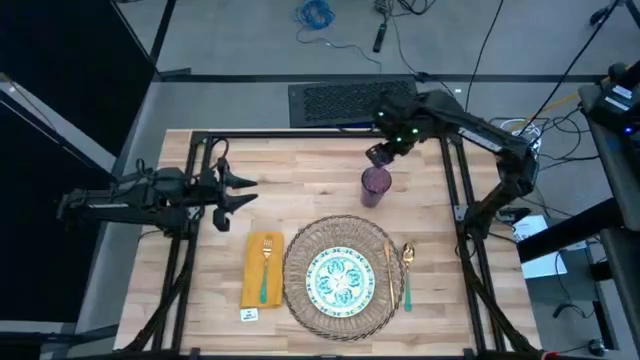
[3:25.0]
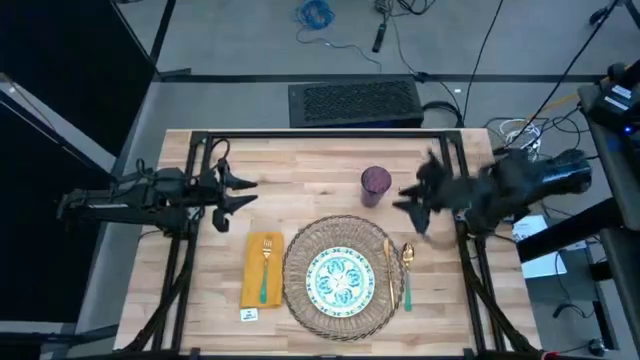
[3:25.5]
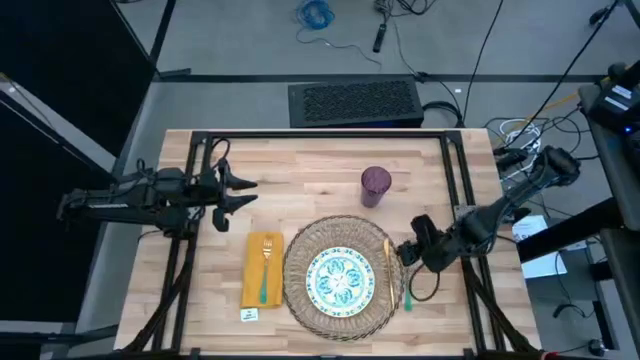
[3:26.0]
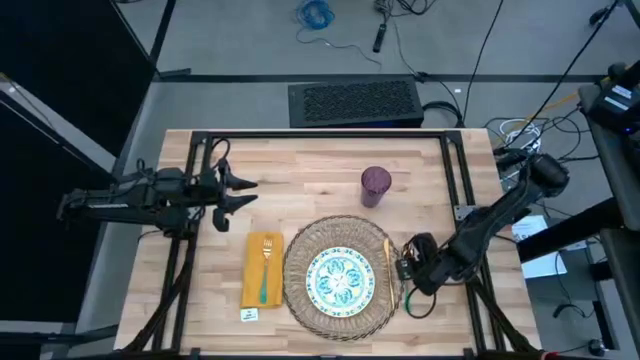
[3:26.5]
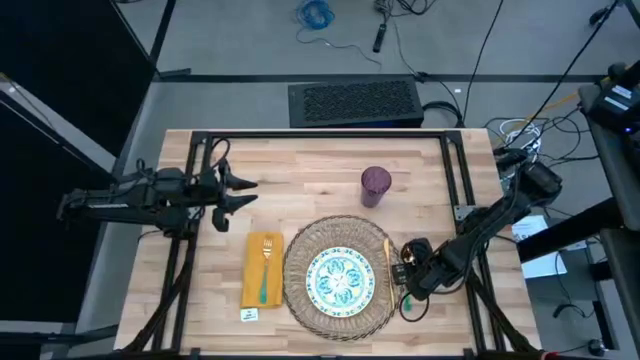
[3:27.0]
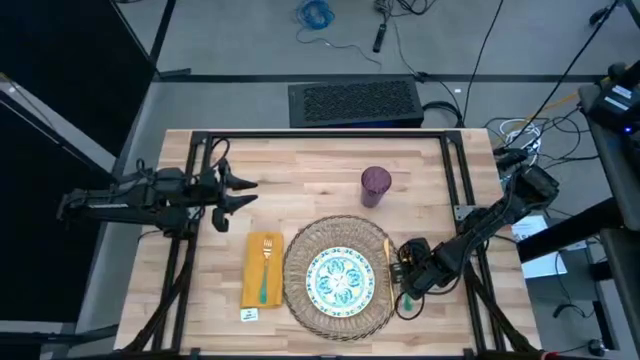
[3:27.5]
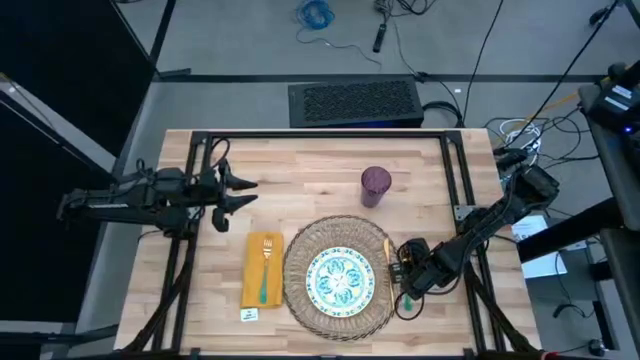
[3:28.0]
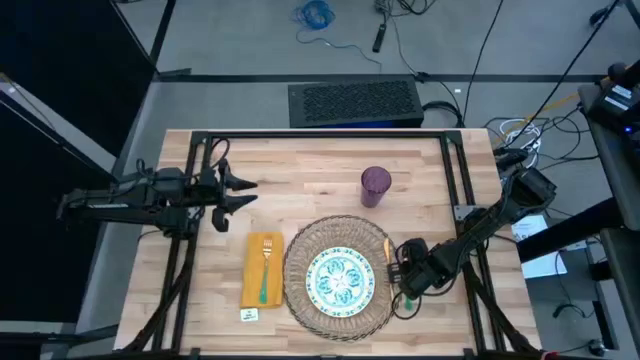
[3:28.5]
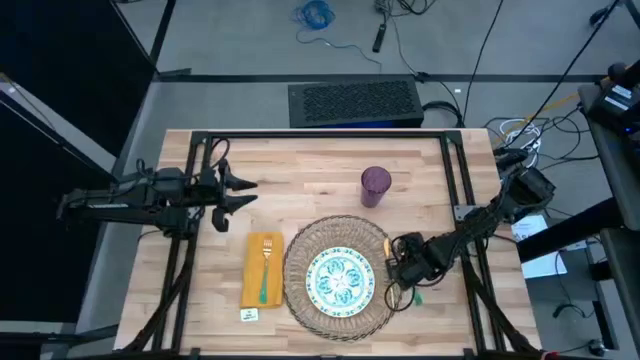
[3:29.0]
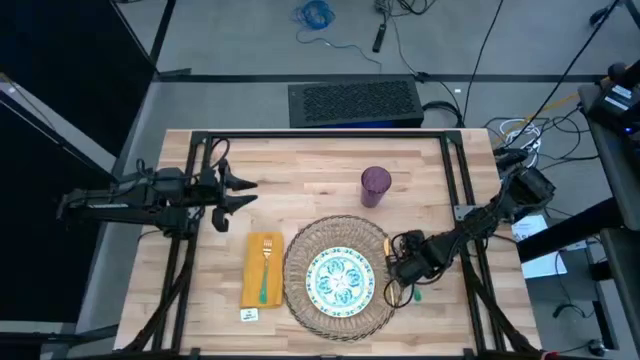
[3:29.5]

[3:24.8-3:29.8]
Task: Set table place
Adjust the green table spoon

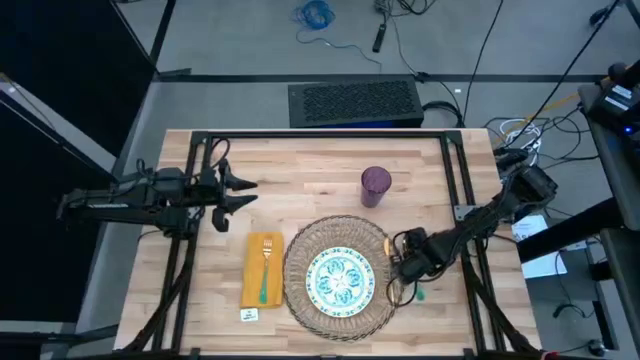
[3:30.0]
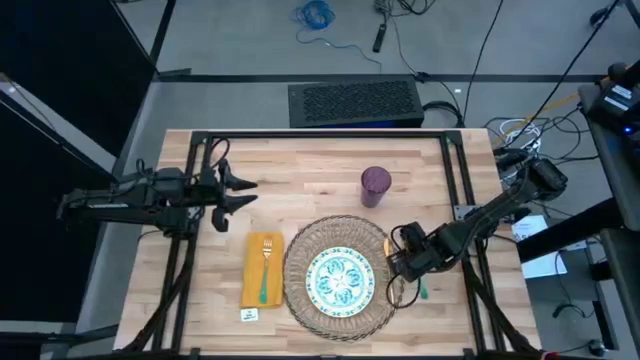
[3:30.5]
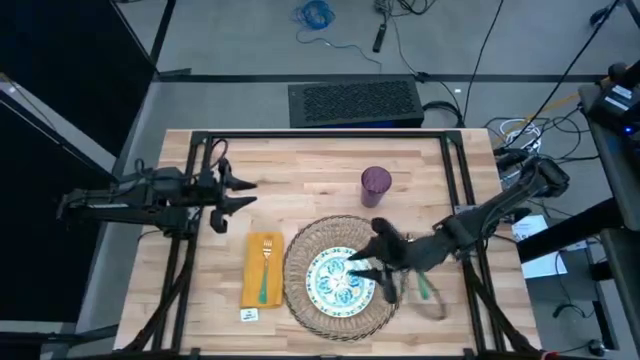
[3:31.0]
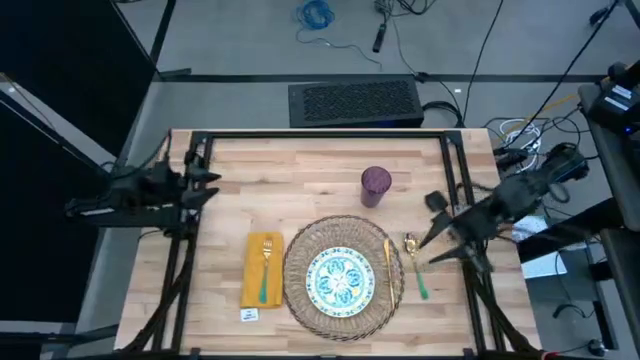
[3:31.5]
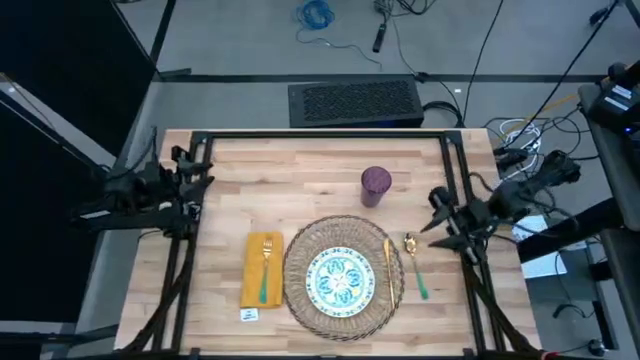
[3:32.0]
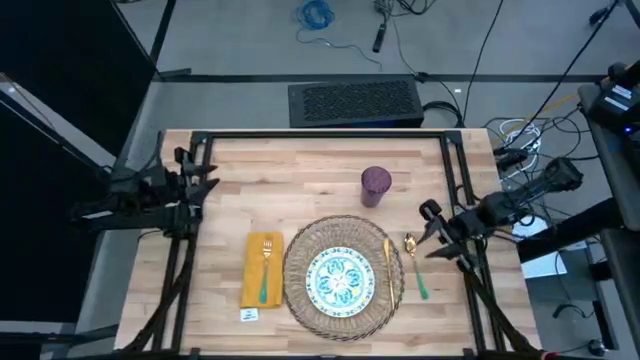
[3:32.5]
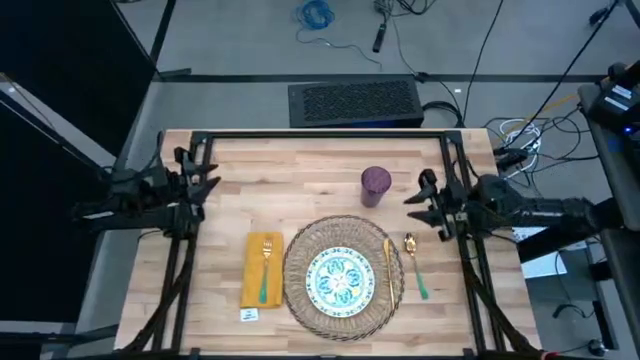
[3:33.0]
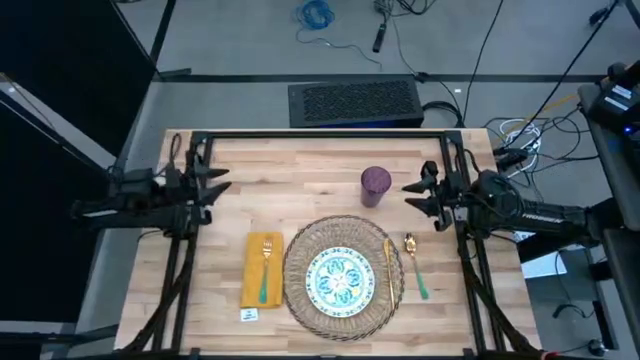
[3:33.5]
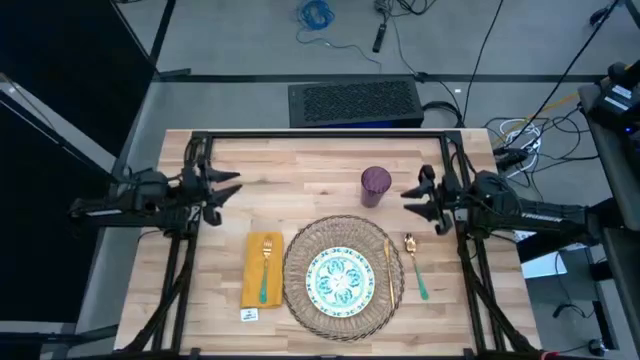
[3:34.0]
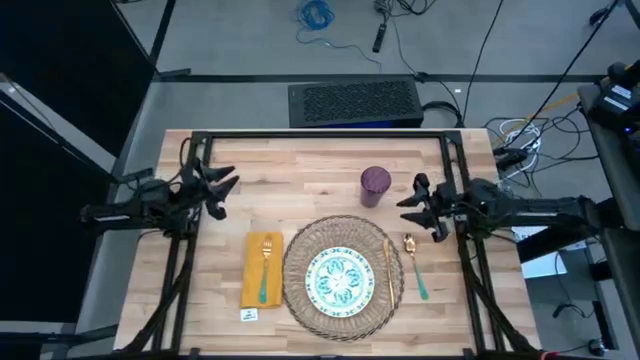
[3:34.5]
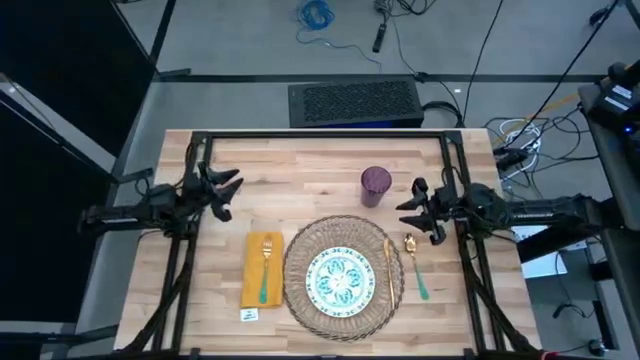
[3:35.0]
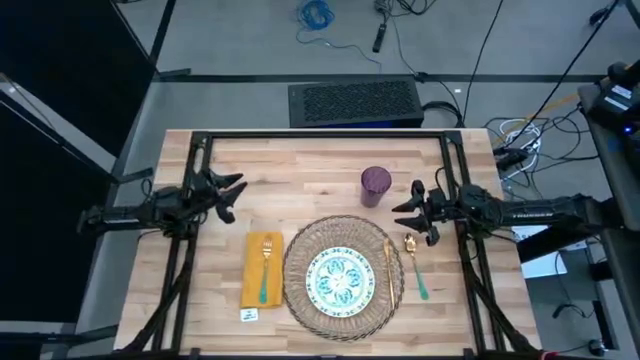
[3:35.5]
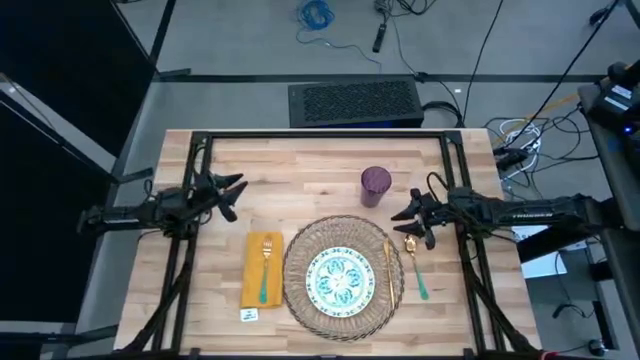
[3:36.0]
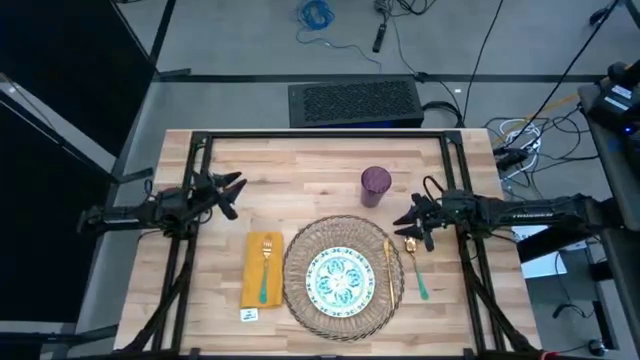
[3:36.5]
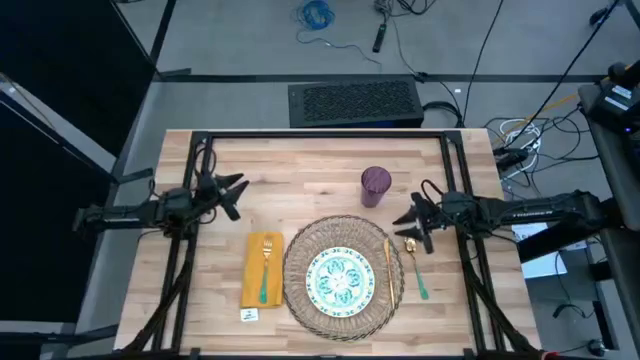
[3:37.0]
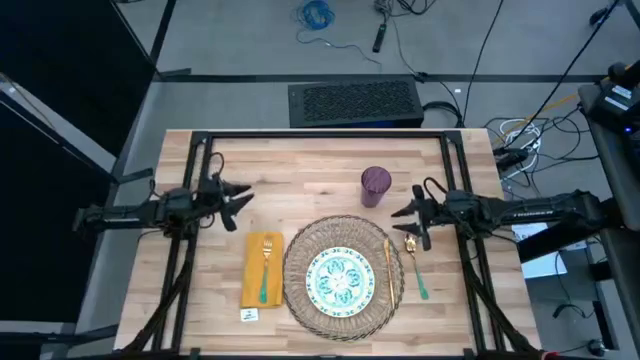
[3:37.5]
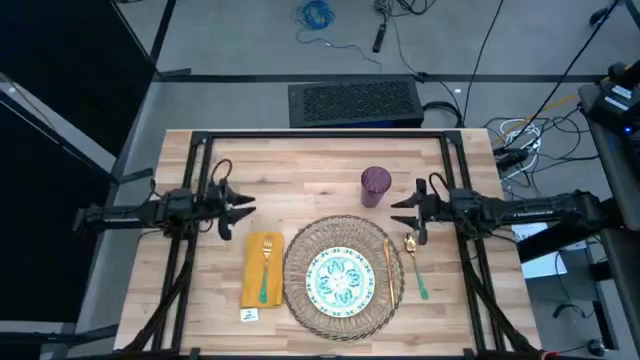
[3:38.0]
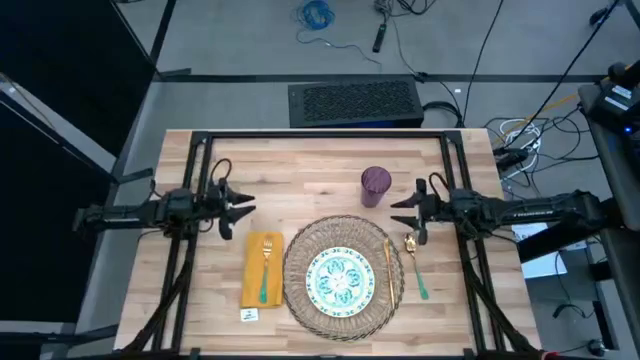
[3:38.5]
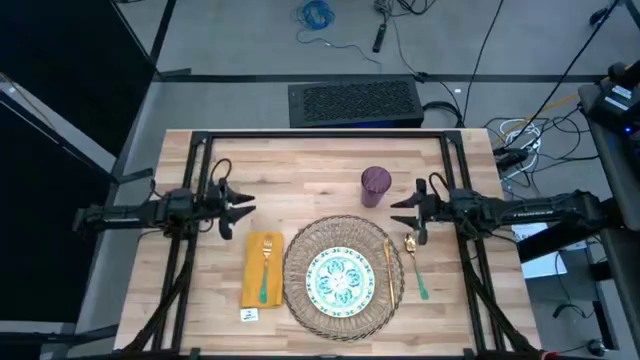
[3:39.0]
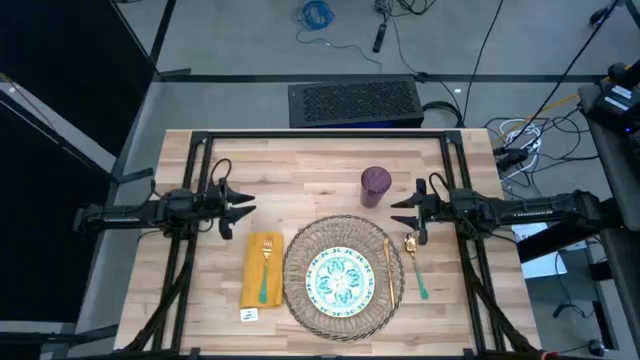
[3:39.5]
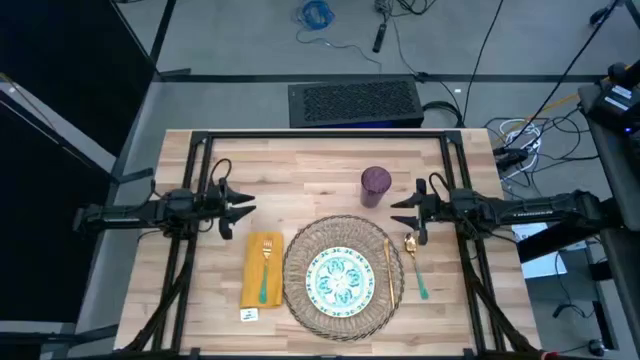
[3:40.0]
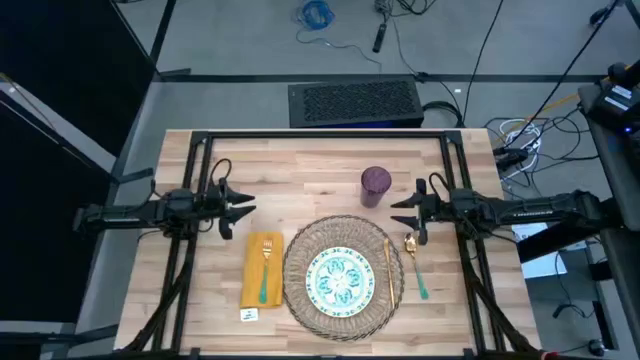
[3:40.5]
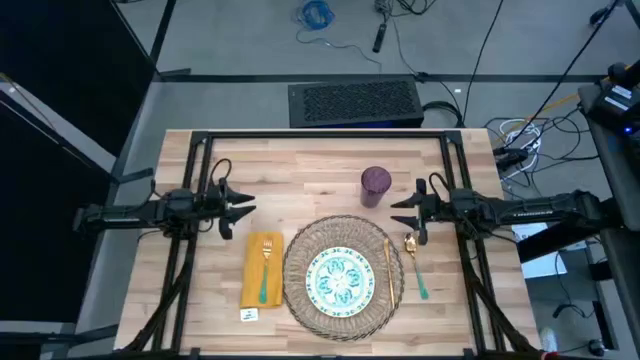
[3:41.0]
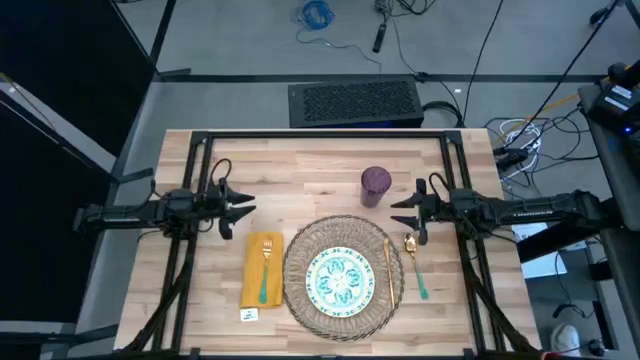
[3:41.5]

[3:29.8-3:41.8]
Return to Home Position
